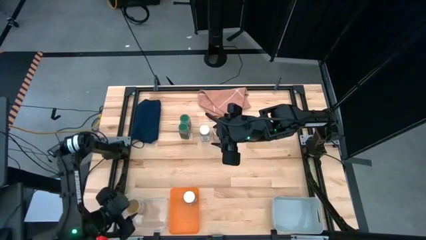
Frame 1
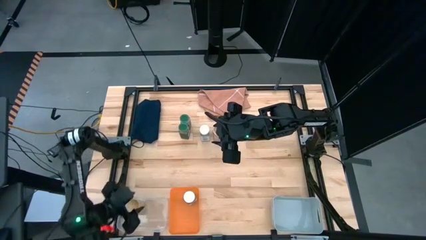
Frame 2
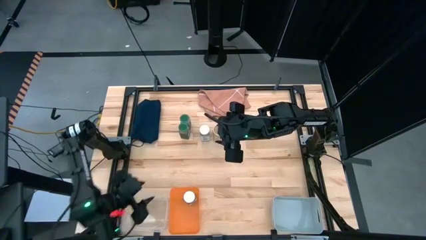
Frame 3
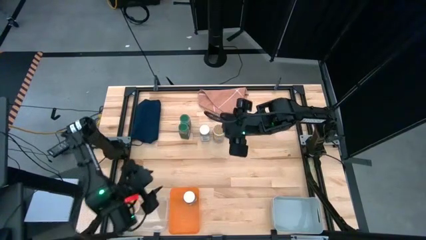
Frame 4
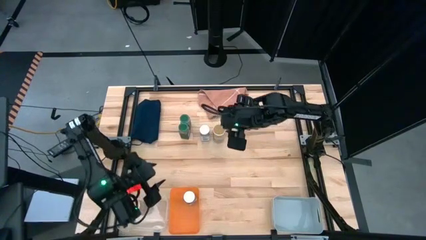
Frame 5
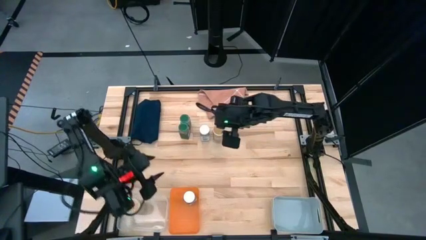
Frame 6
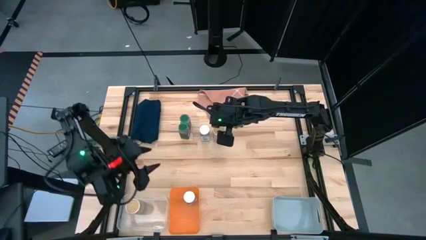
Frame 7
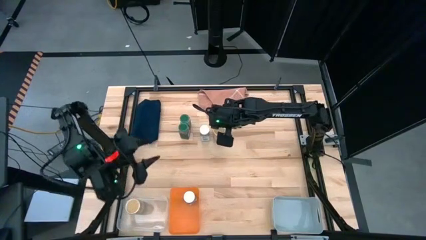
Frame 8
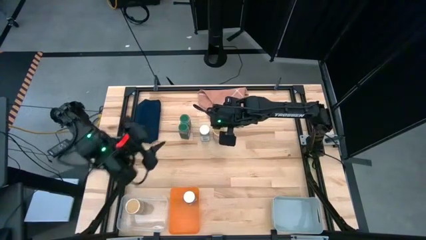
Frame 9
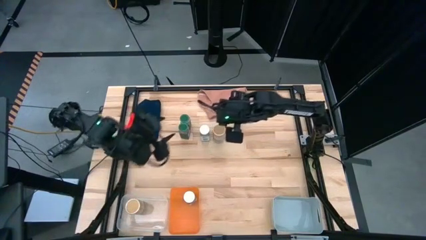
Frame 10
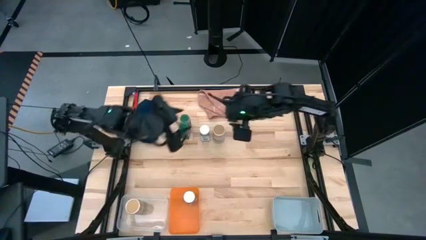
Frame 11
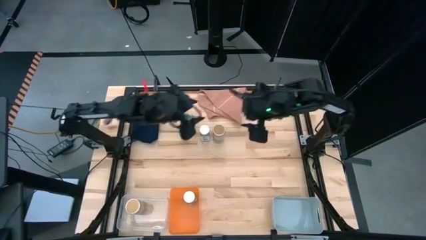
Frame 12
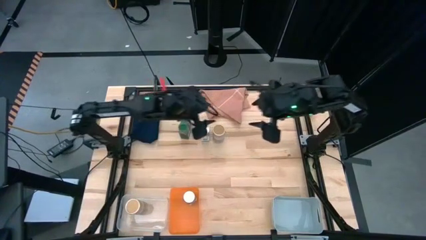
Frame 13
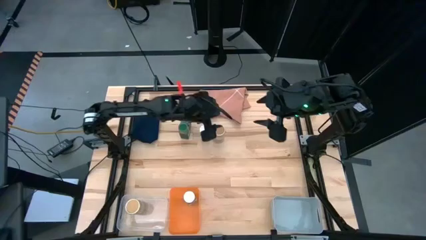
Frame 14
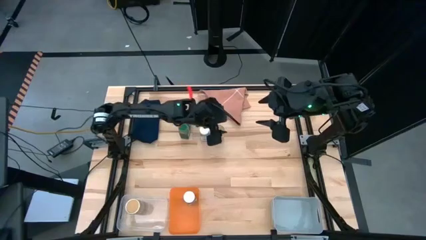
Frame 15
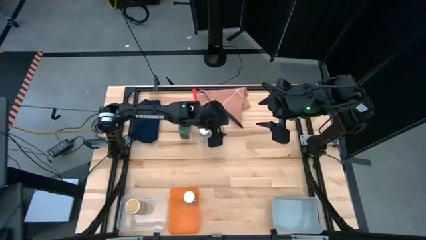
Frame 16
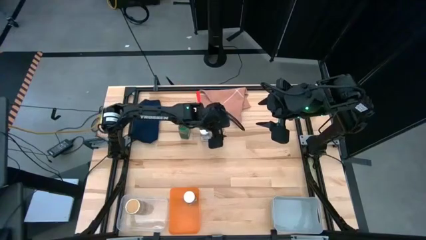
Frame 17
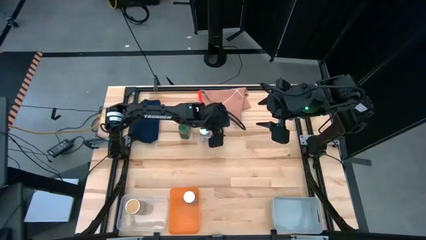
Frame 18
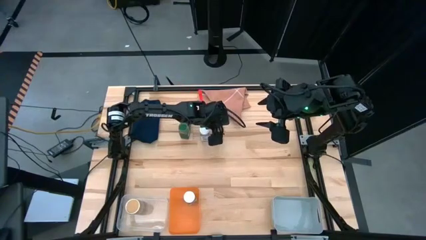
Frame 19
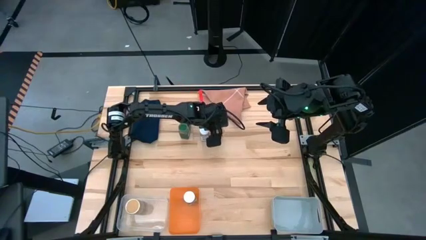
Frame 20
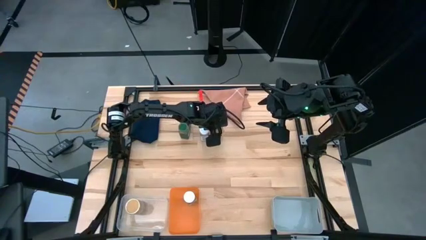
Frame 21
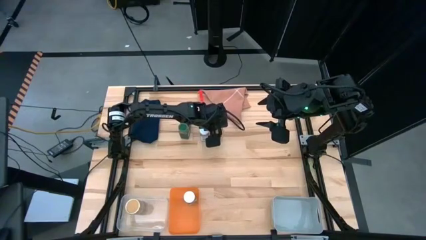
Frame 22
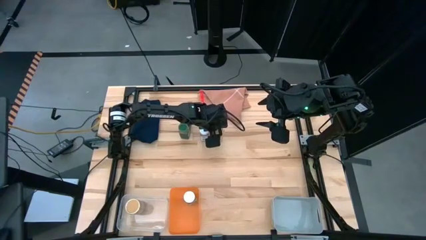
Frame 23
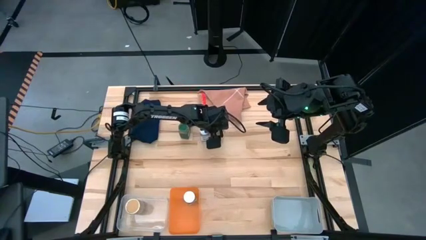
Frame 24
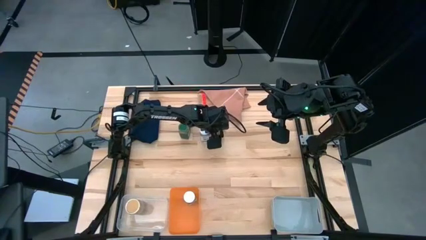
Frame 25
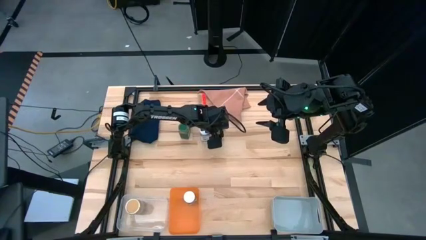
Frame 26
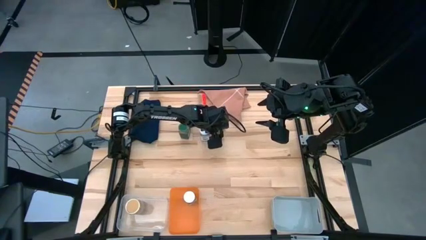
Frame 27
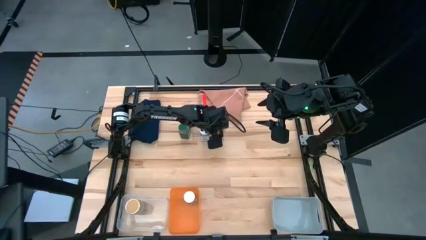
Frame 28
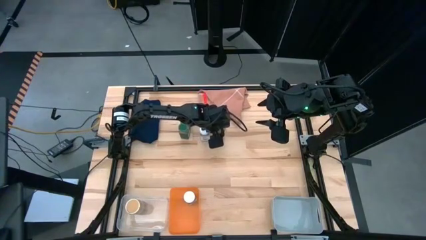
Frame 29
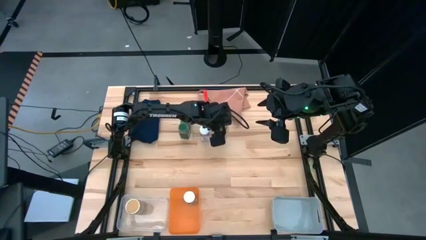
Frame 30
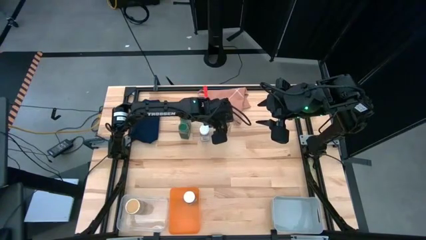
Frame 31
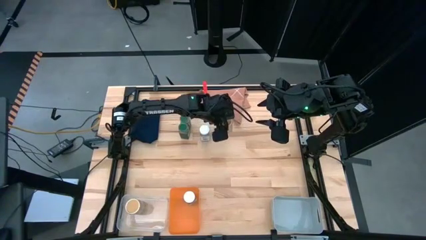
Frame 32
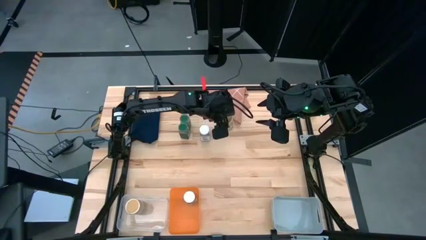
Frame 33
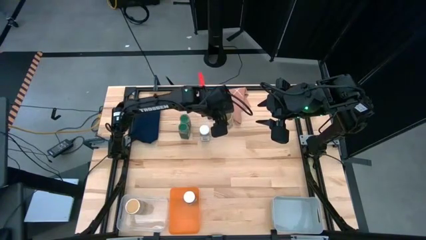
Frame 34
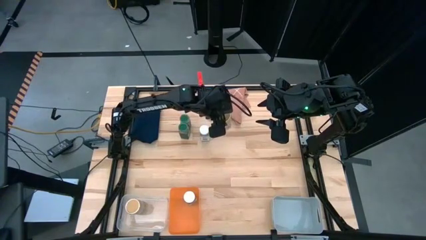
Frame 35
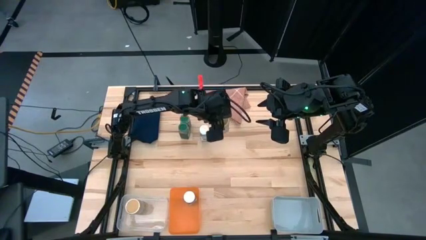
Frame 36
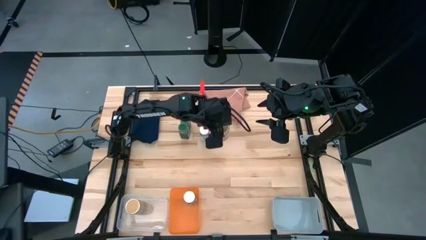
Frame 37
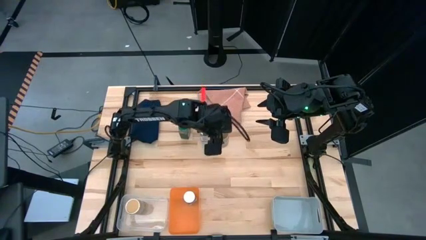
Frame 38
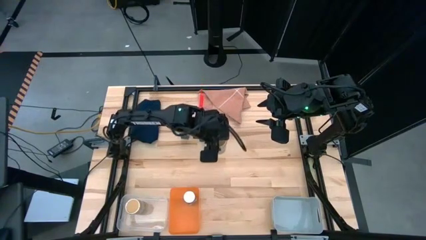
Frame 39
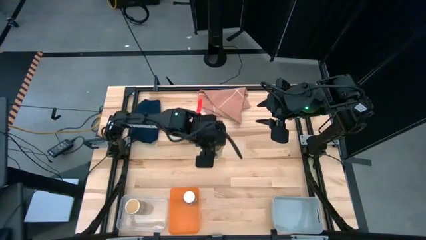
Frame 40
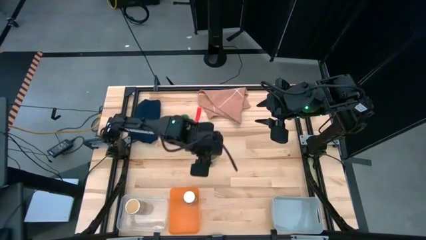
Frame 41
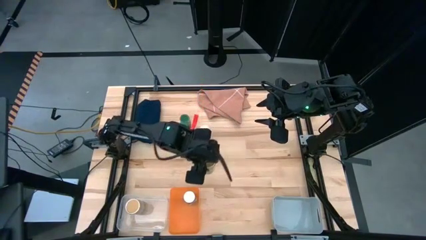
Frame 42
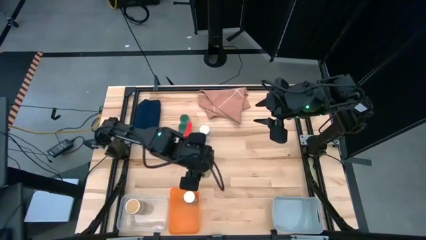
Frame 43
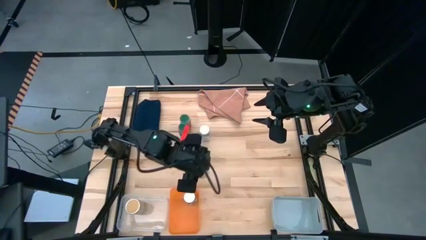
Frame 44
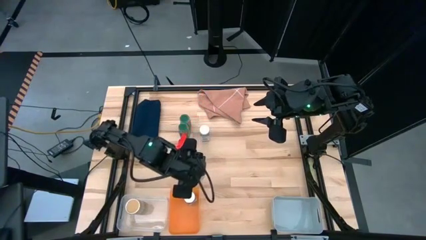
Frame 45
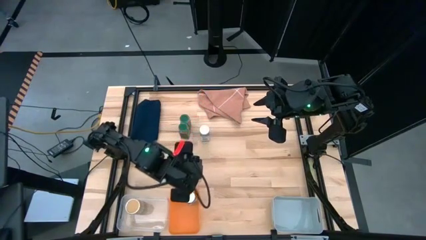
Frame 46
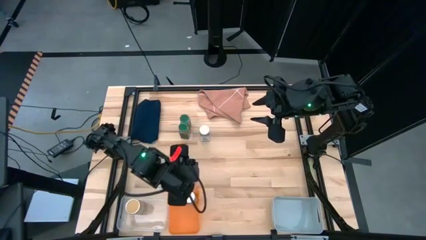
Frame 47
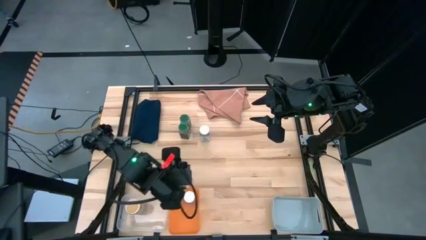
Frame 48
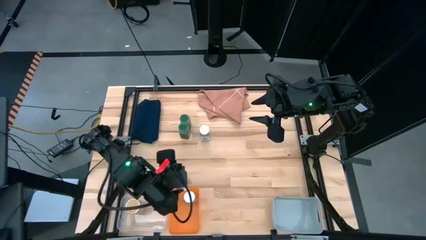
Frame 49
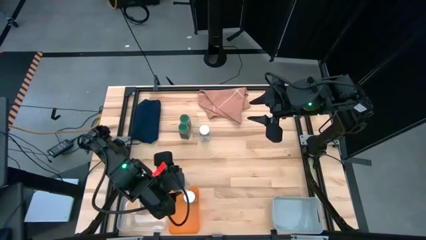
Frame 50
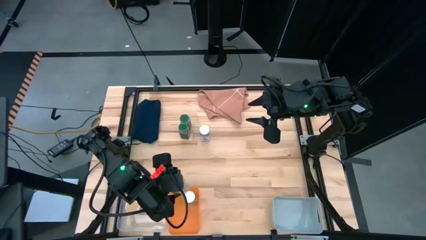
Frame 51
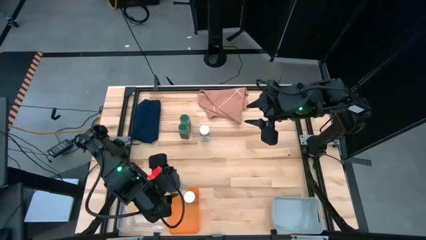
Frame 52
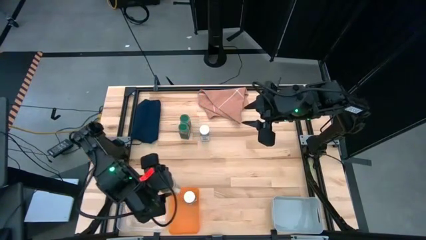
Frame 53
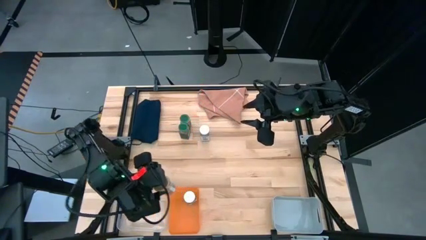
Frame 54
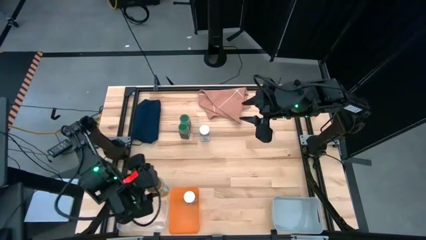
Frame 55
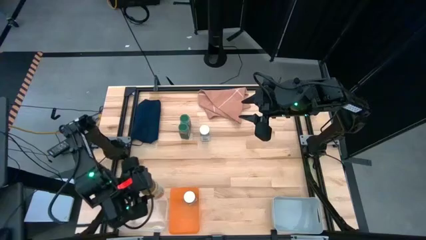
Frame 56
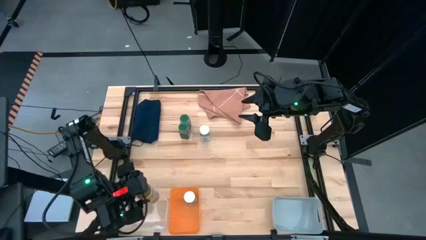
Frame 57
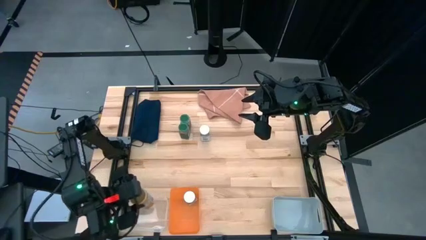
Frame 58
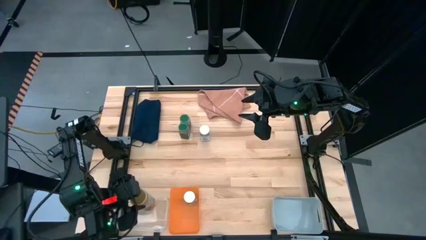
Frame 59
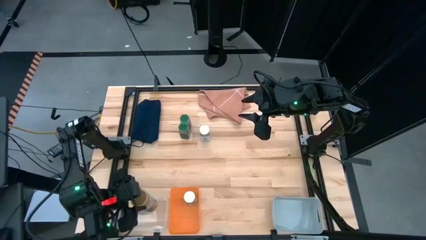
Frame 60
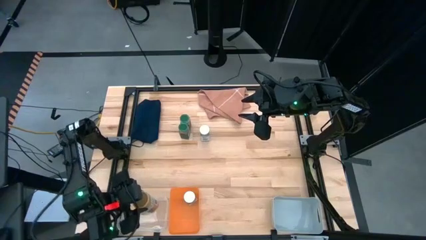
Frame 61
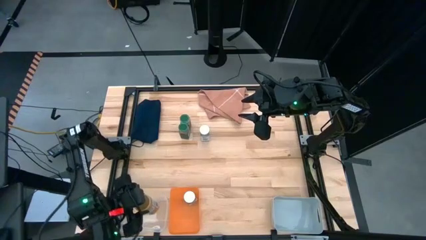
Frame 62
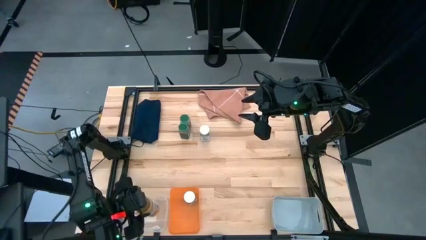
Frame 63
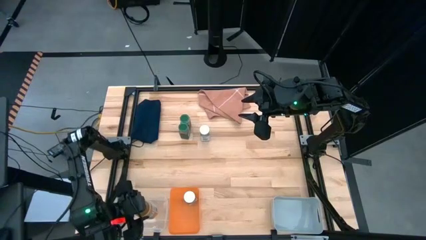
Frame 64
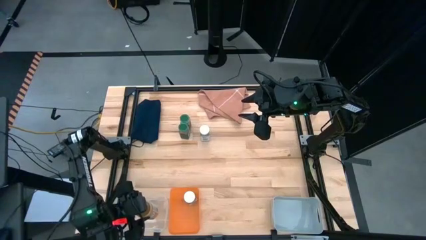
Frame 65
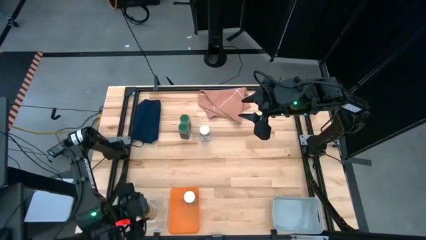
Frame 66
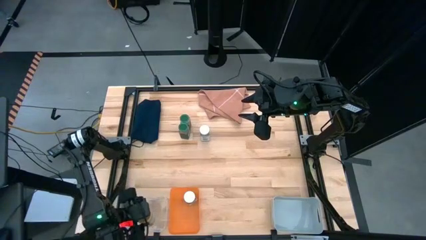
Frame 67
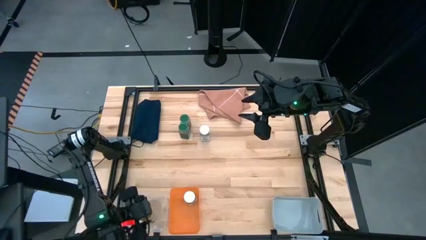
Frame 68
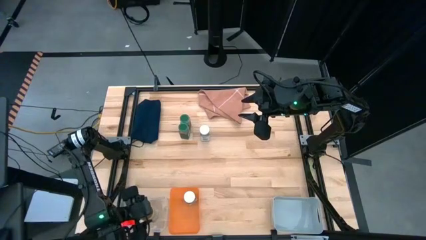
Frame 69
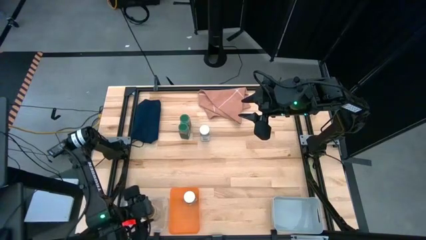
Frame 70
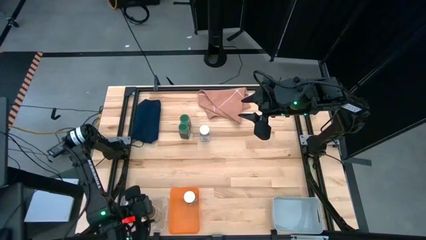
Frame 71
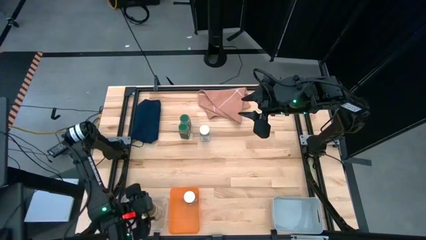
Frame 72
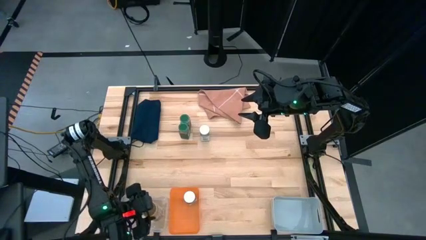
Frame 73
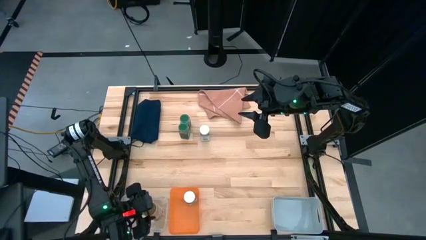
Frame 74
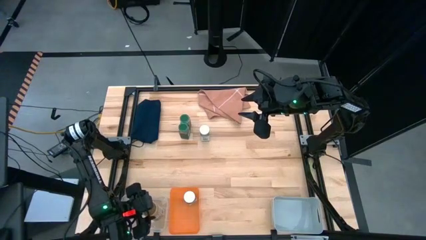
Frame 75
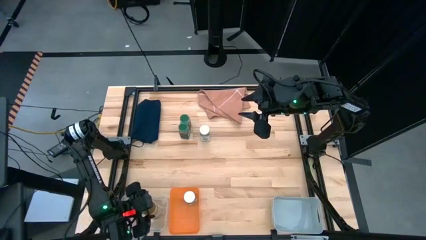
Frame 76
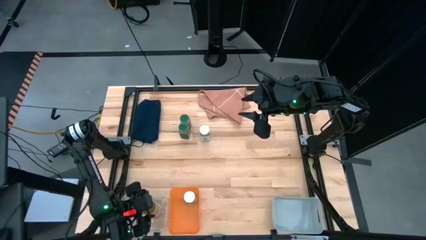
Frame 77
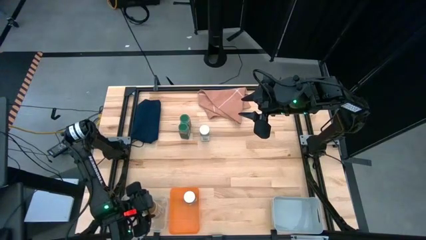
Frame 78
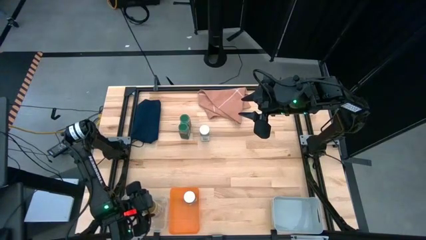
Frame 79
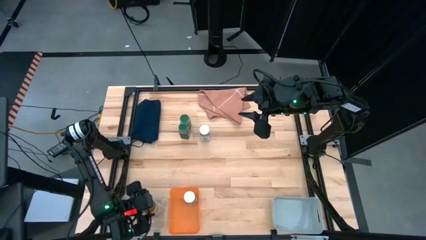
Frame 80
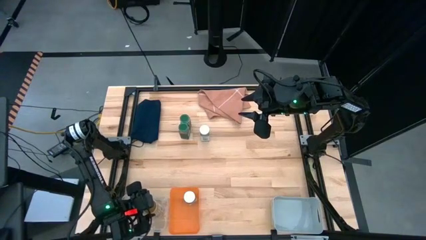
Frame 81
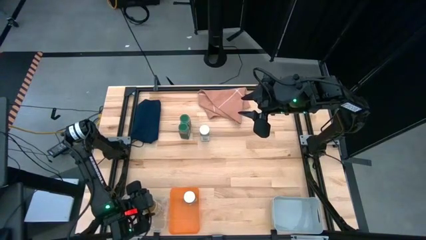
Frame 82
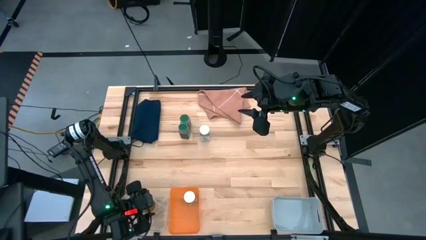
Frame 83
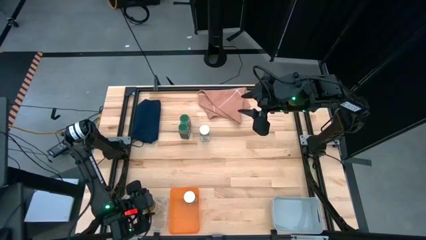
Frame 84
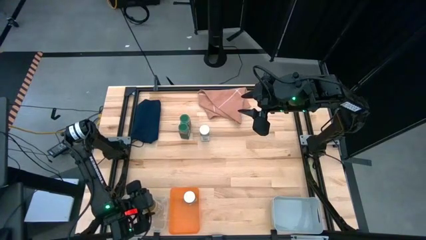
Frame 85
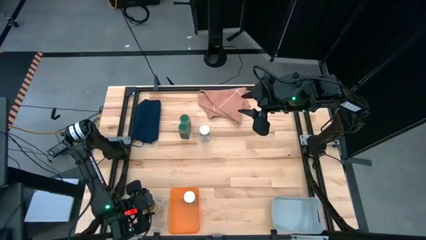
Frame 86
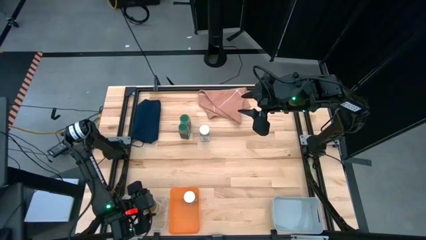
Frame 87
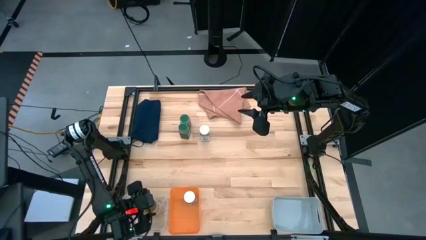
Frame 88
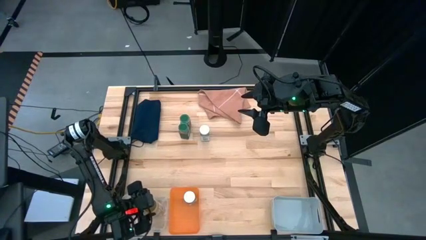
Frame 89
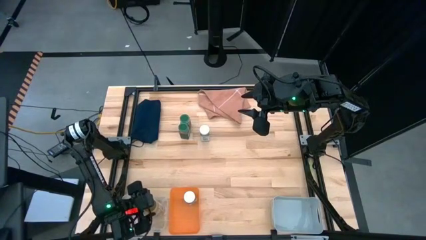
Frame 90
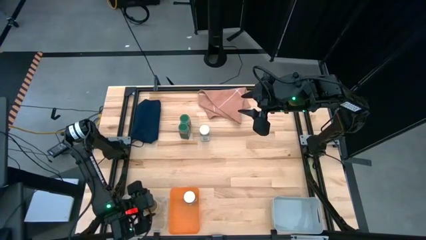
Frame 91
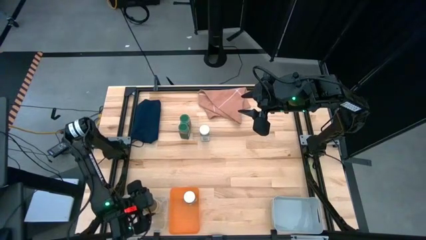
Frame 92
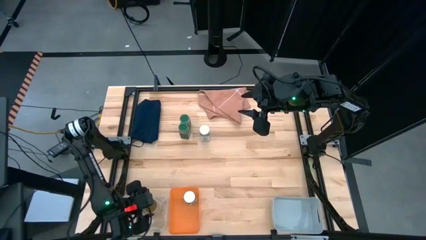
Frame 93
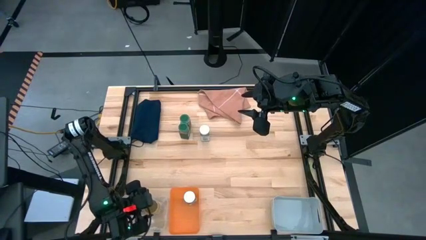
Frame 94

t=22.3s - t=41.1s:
Task: Sort spices by type
Put the gold seasoning bottle into the transparent bin
